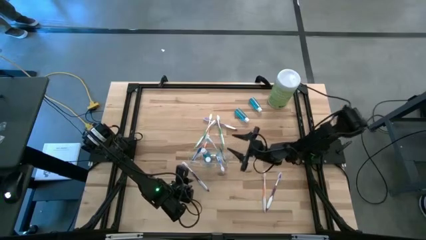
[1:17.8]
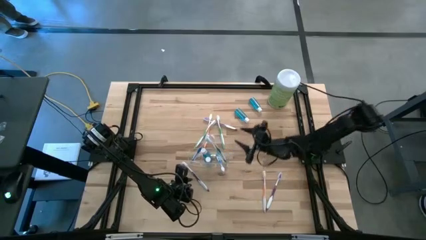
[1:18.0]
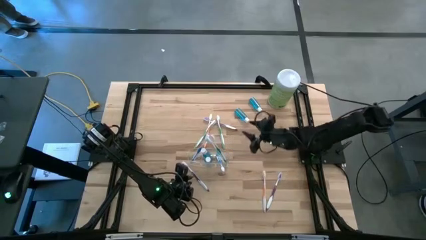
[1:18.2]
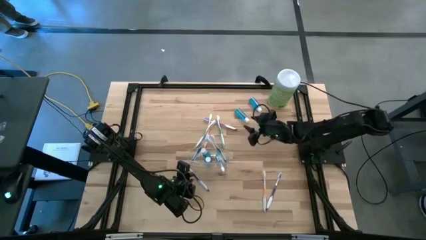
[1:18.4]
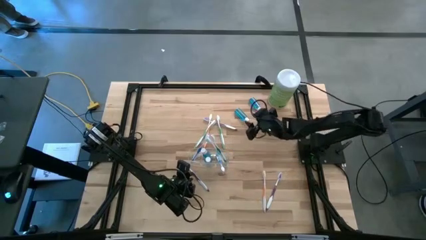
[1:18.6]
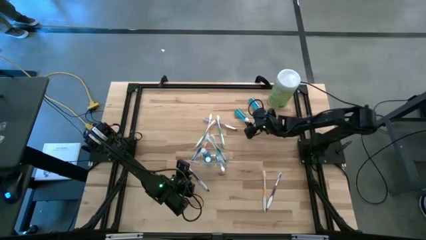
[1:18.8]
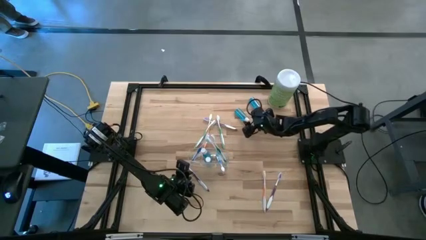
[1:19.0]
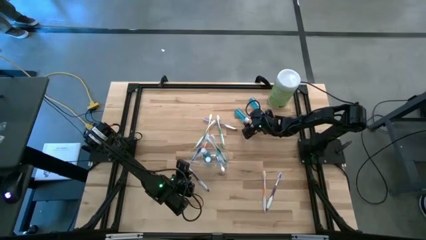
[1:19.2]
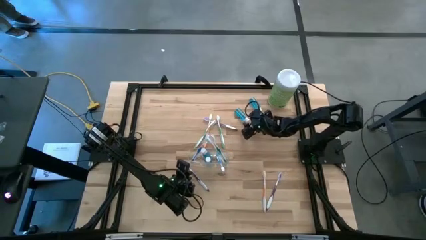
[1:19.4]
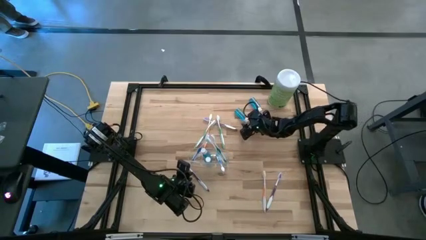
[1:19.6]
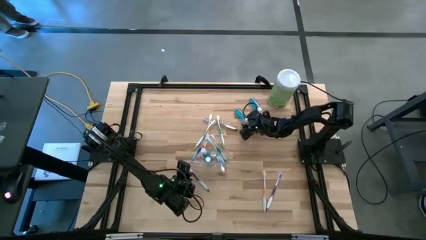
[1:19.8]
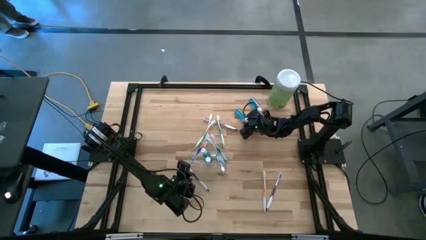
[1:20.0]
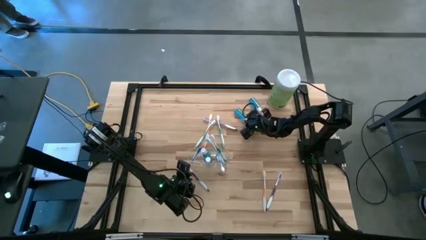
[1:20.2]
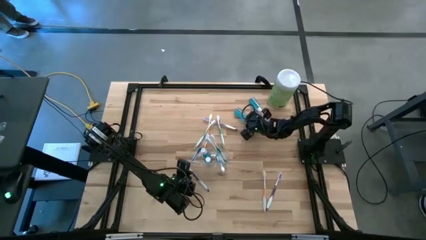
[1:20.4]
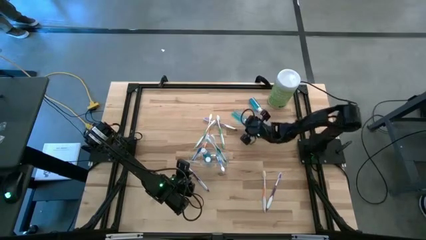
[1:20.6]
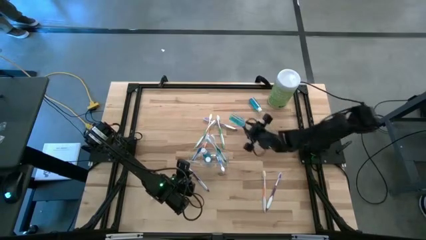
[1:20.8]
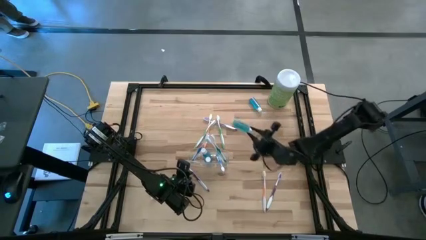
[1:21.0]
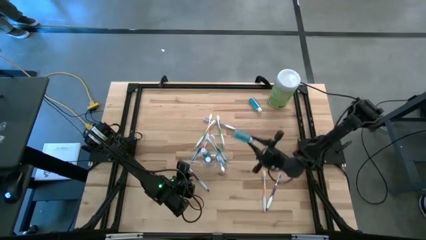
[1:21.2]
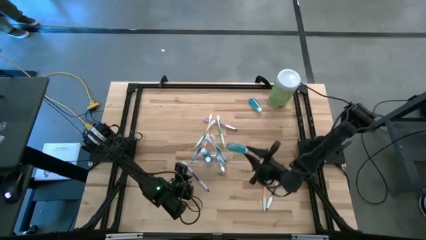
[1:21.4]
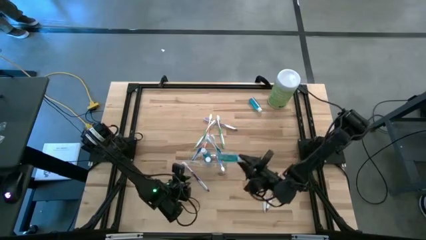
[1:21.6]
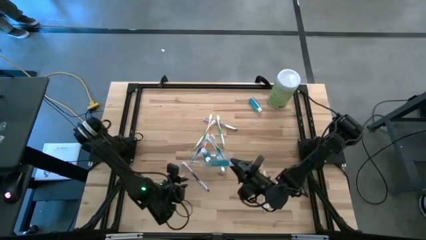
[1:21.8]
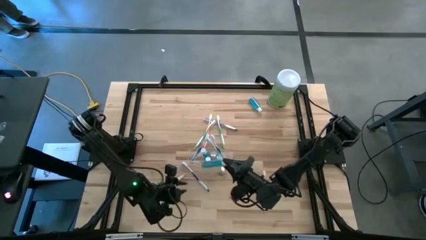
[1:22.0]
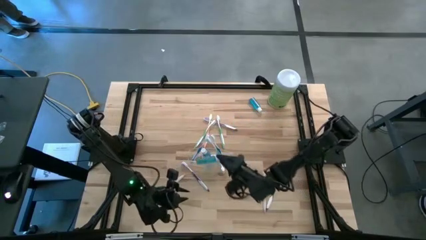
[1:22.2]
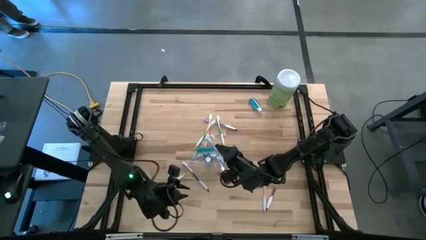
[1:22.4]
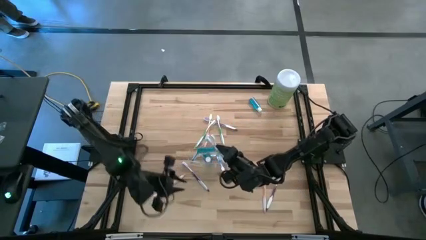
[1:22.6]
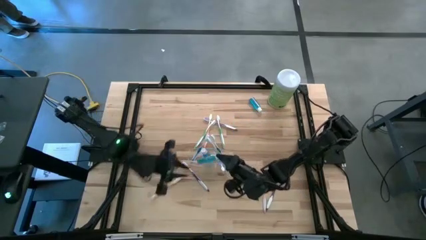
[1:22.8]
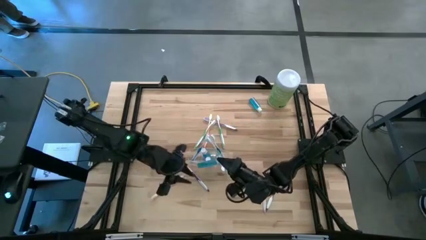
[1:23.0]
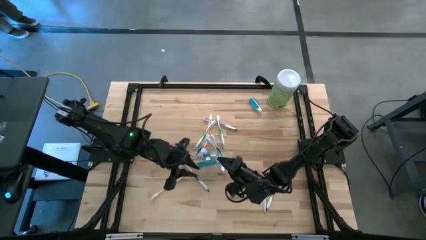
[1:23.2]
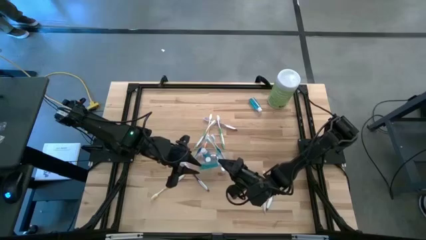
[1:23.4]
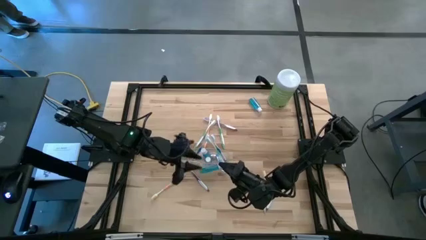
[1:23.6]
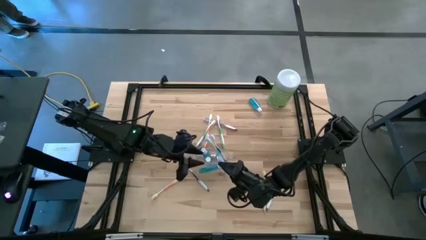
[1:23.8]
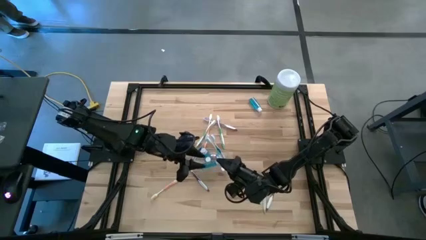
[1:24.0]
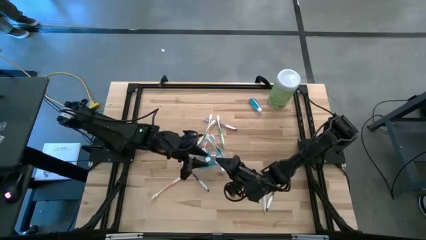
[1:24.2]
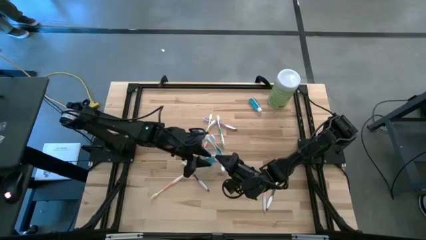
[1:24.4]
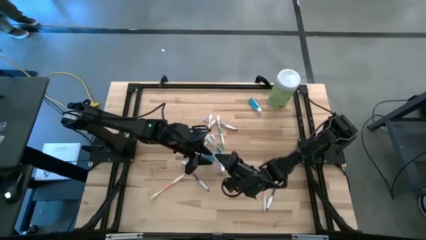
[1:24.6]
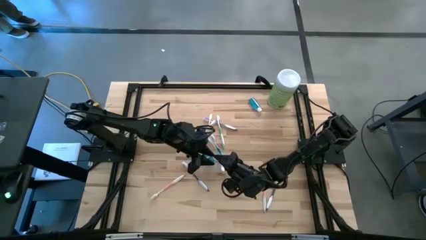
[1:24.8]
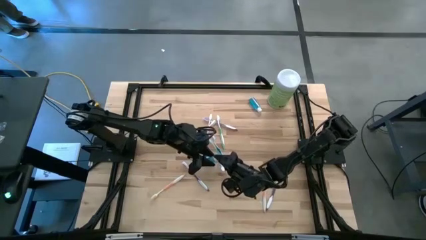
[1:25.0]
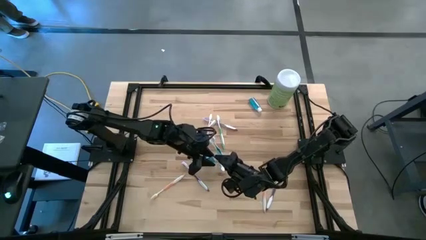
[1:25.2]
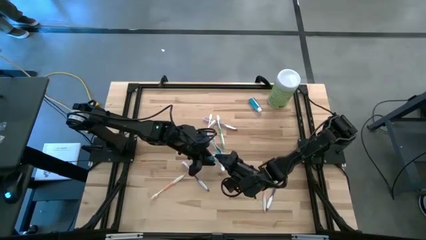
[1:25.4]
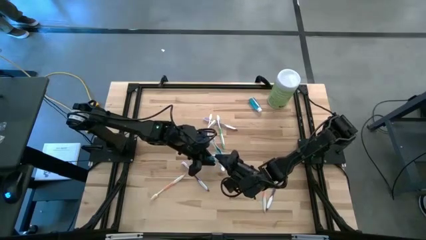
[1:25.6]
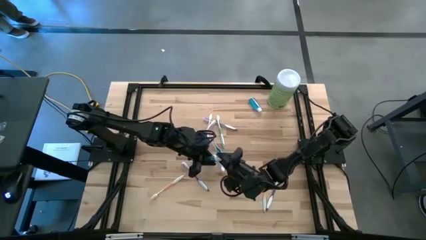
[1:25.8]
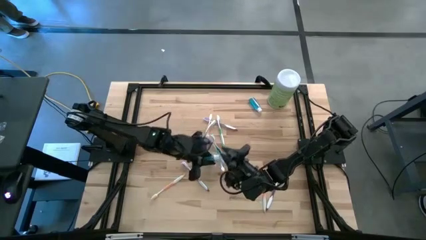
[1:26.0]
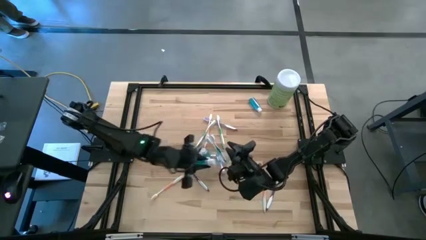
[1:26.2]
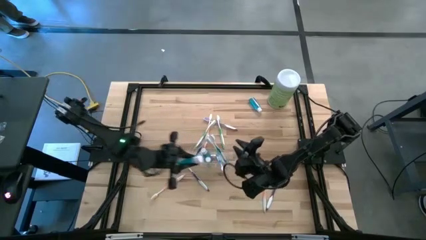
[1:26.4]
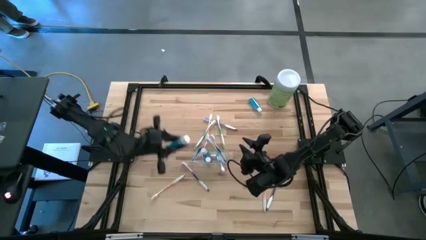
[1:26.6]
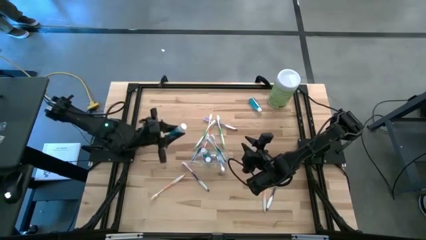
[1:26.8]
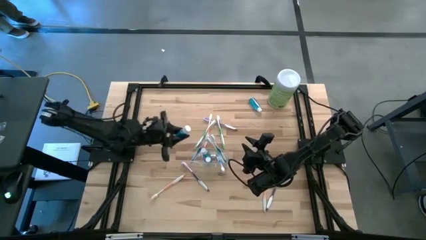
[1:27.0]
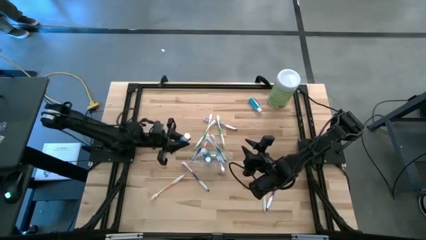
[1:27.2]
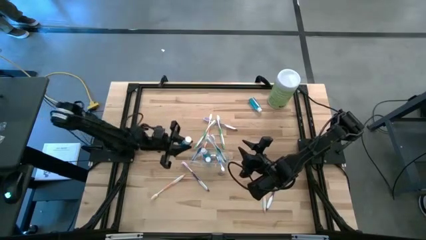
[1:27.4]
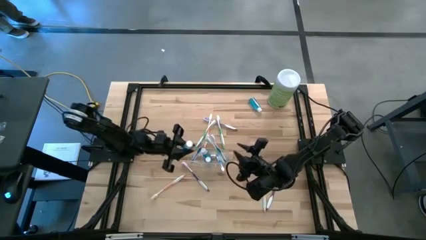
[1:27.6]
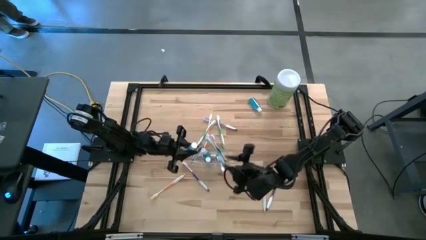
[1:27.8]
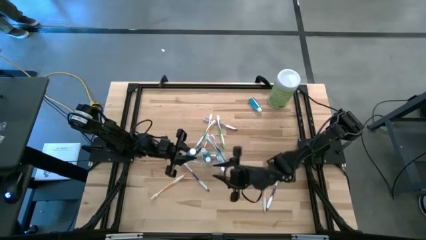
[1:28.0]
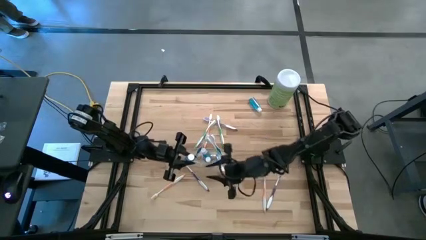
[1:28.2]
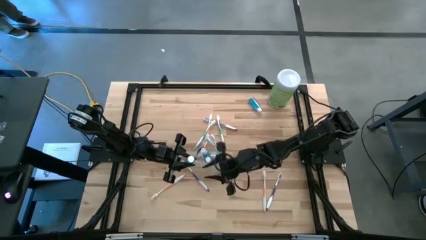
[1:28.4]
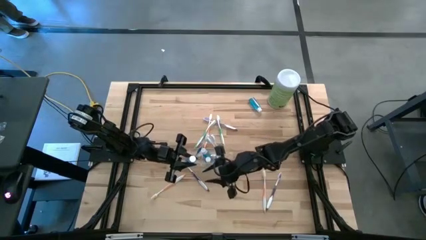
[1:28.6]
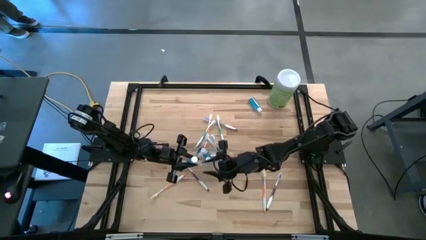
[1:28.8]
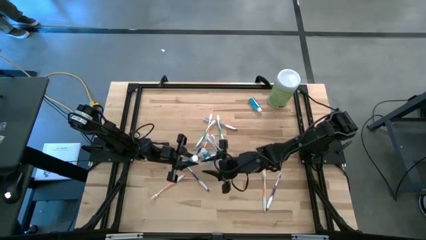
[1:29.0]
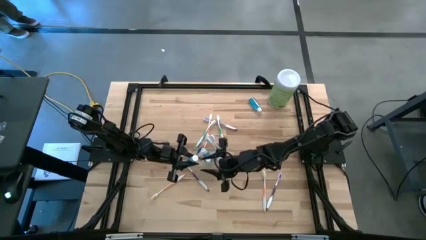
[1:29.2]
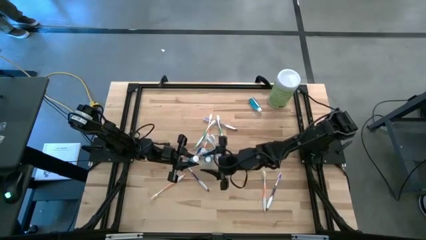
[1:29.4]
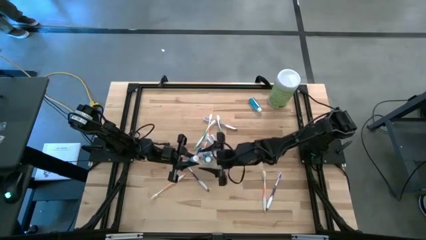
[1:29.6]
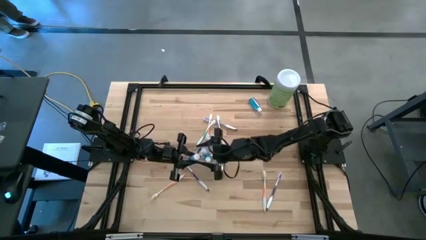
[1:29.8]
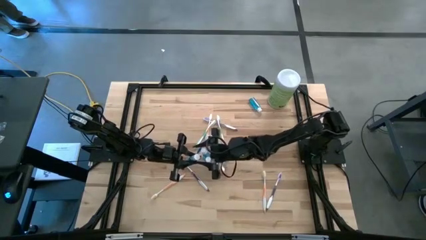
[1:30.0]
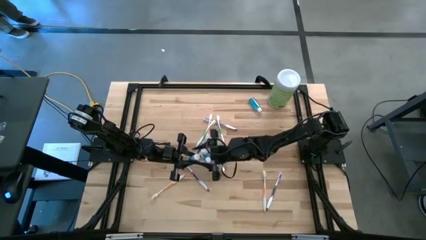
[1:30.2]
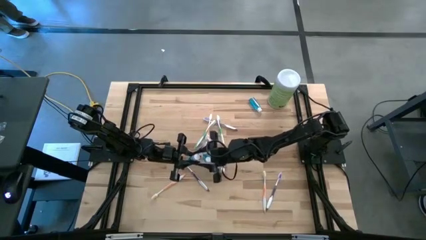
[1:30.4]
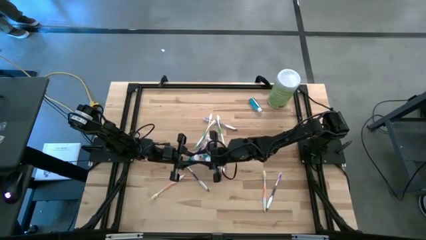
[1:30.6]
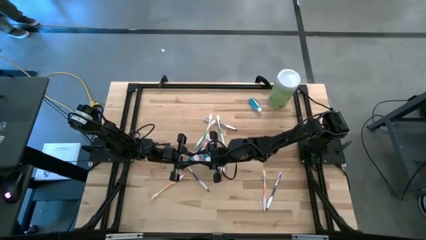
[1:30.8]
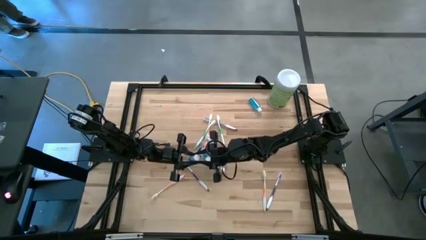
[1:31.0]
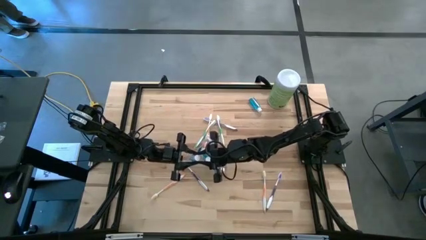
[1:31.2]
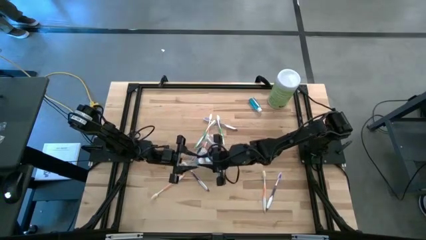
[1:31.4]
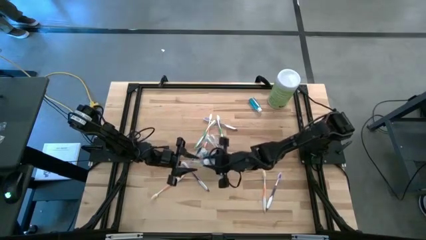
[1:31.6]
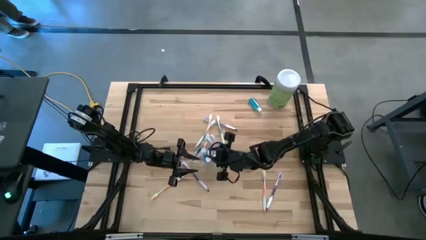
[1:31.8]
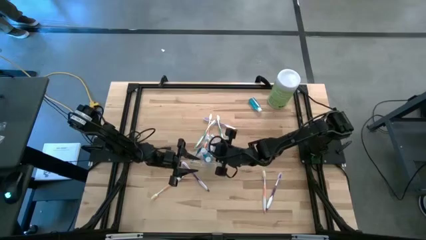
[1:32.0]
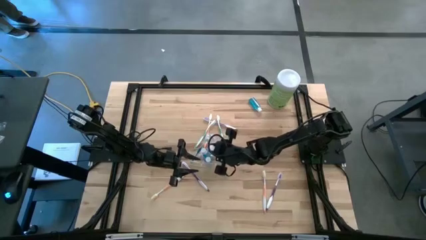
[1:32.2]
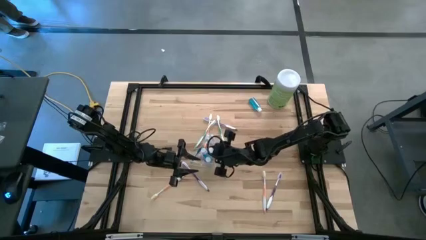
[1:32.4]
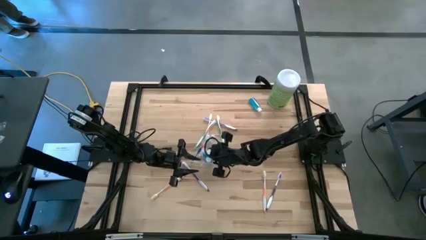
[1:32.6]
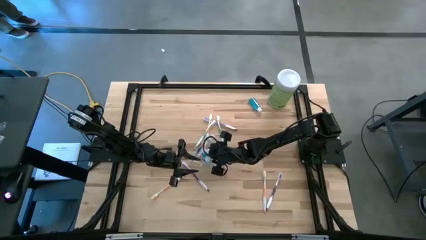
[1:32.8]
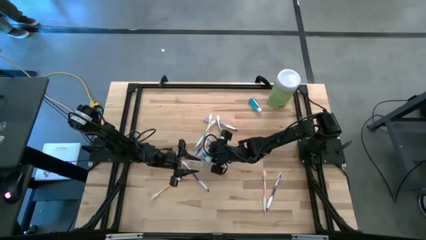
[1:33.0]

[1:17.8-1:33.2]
Task: Pick & Place toothbrushing station
Put the mouthwash into the center of the transparent organizer
